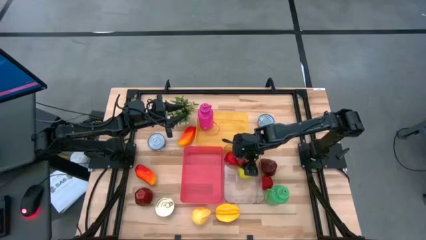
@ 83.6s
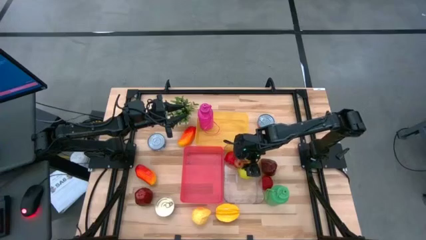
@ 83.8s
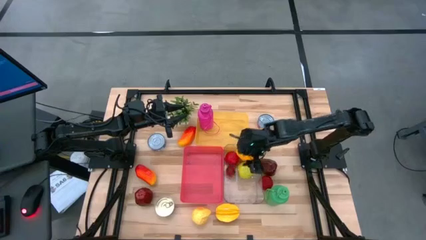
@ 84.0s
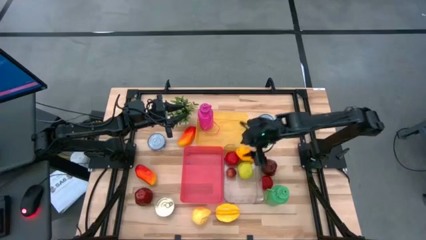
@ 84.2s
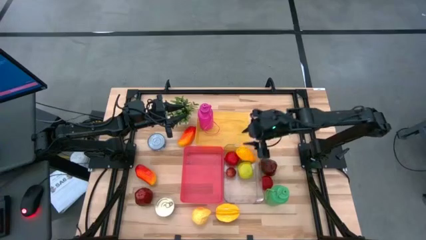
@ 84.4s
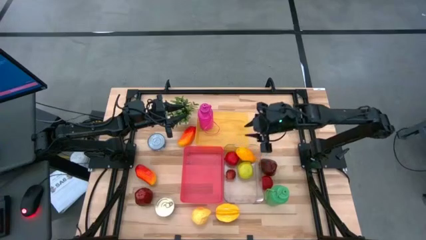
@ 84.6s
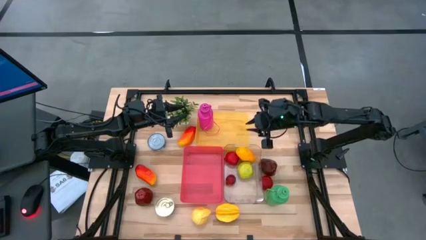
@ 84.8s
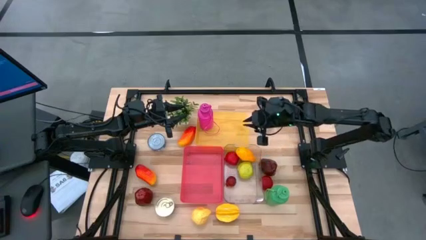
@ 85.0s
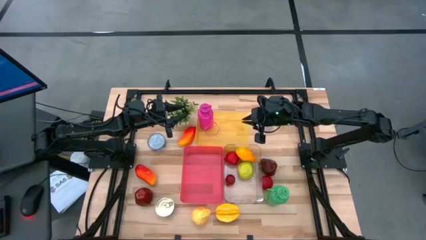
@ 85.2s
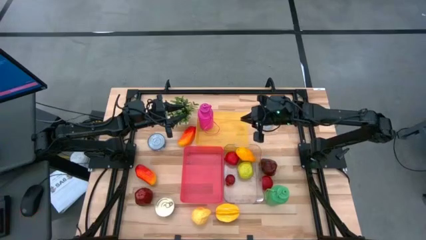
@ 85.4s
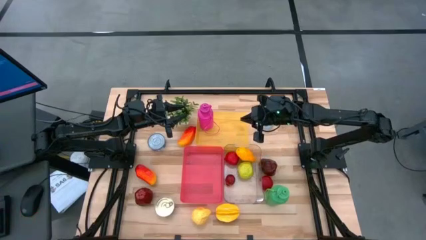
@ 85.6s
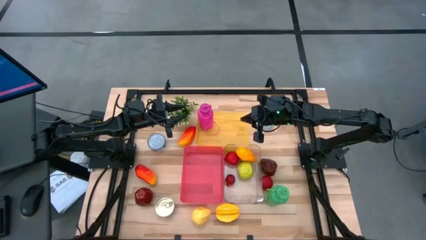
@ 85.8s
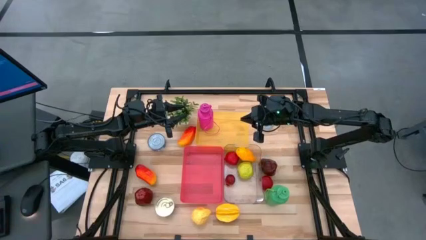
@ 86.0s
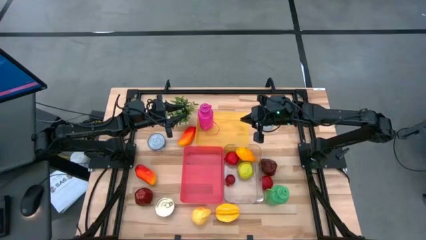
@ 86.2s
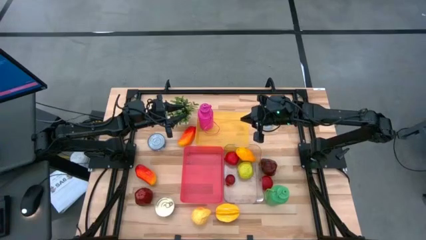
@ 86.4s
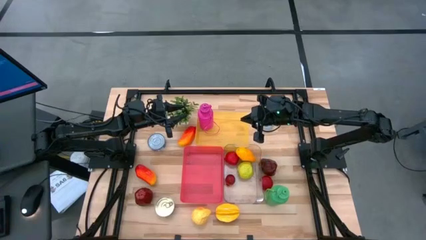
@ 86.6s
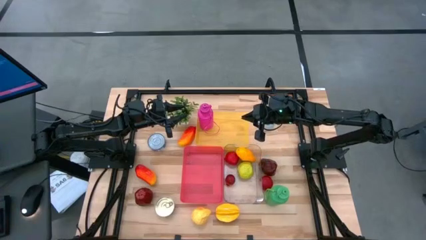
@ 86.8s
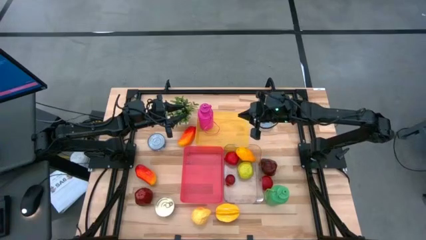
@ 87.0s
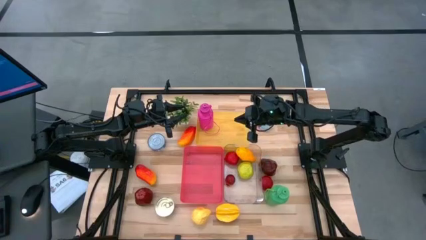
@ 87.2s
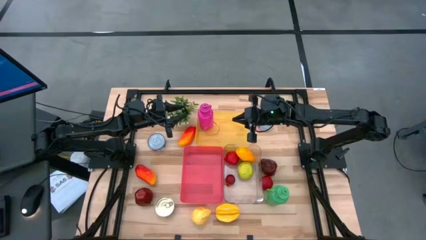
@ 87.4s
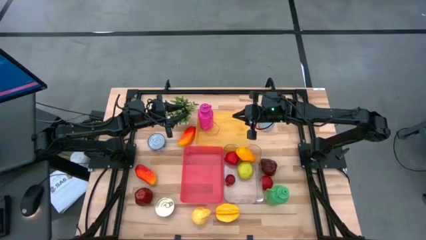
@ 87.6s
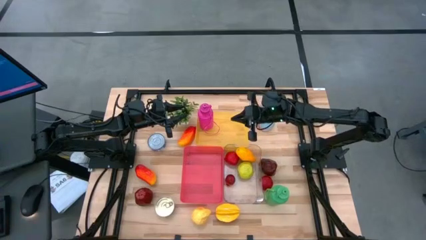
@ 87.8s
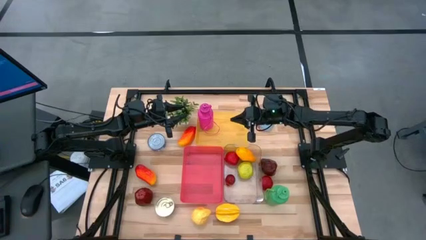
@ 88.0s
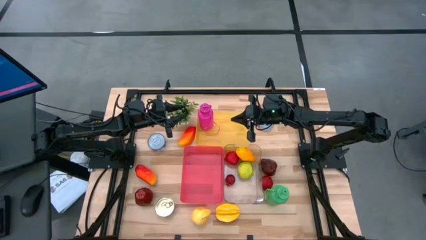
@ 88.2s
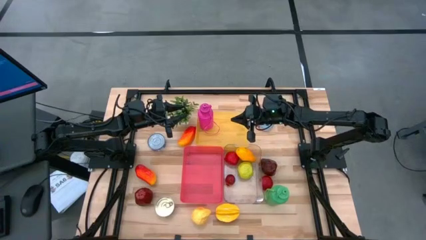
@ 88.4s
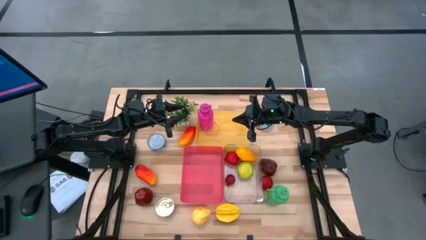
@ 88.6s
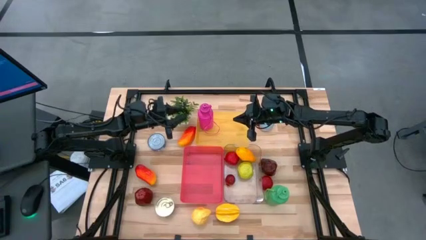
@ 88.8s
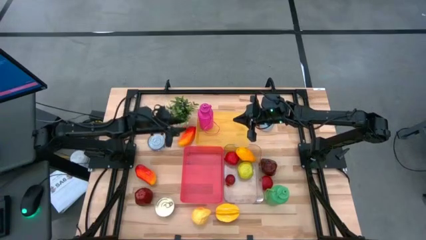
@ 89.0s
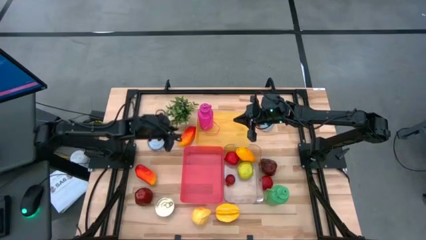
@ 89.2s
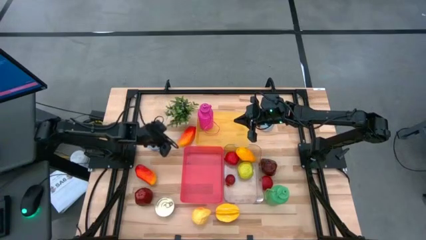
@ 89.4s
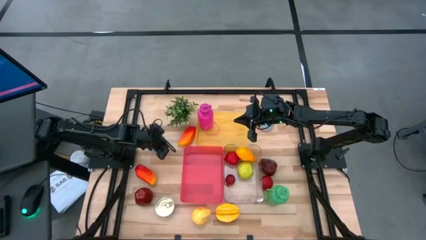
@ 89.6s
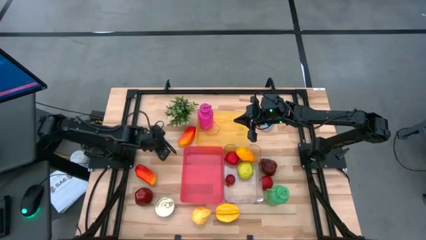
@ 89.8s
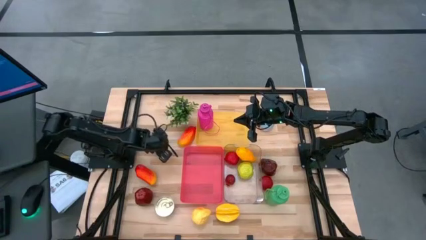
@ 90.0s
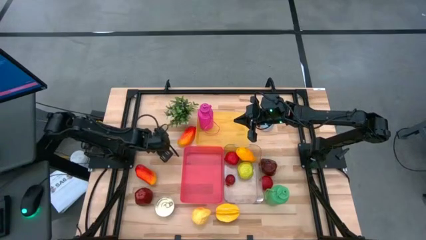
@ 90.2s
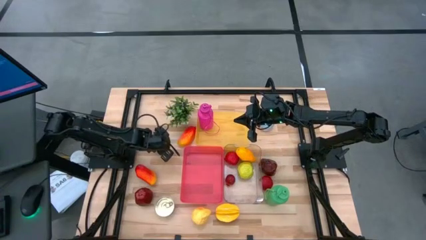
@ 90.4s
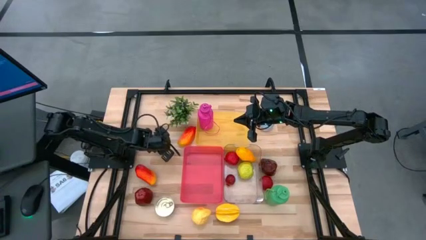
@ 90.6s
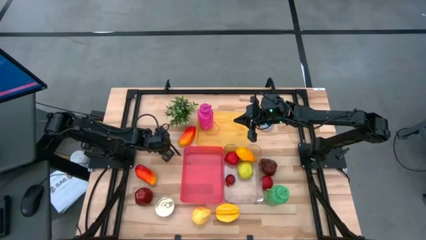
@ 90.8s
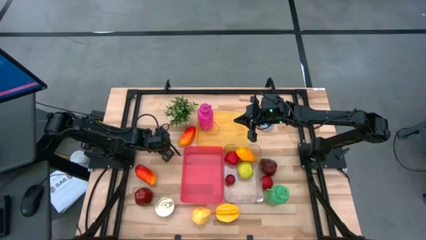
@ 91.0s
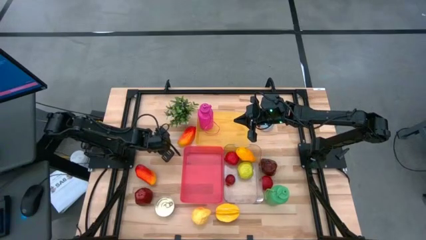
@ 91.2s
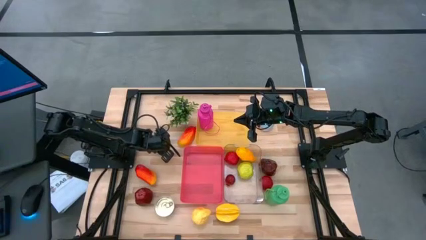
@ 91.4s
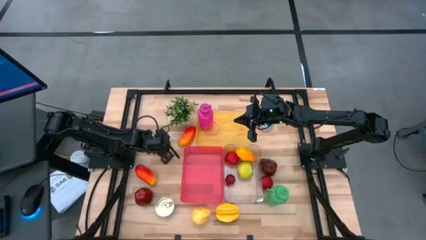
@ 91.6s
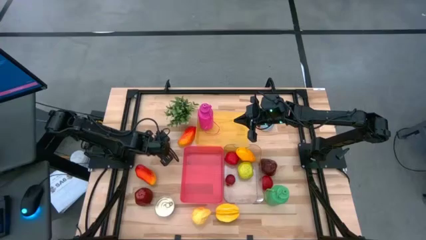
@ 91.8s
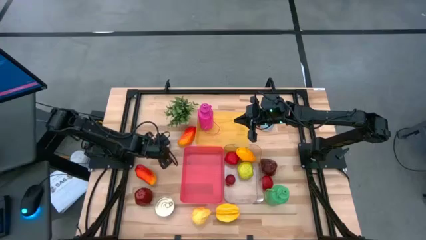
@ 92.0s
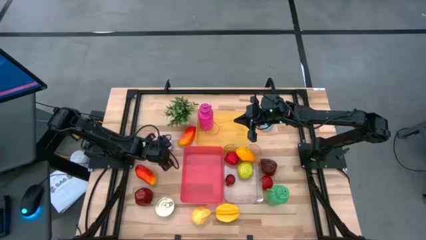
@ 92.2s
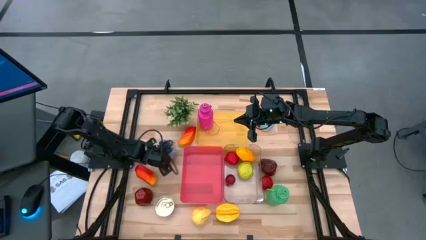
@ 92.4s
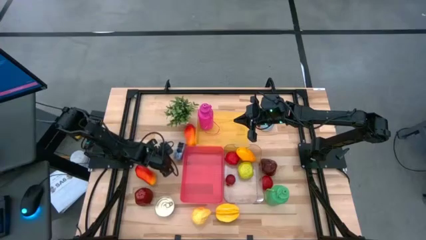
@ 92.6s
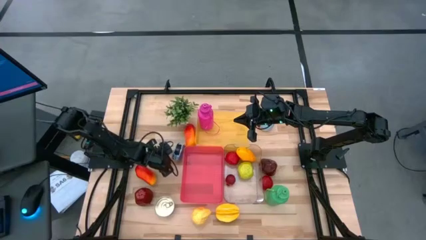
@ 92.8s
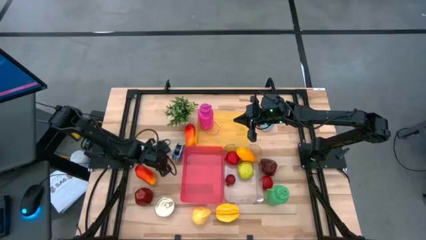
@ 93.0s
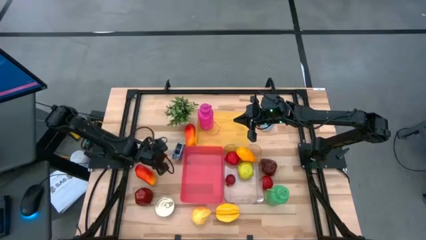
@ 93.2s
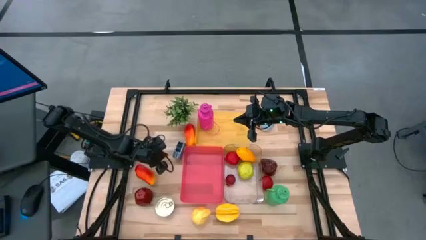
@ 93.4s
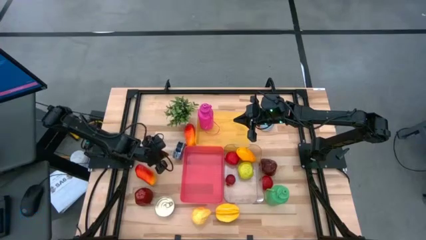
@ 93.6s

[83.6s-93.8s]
Task: Pick & Place Food Item
Put the blue tuna can into the red bin

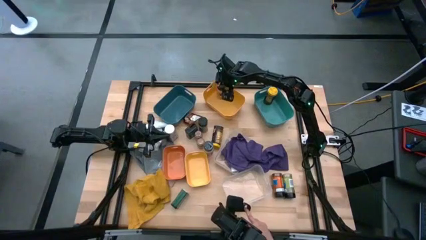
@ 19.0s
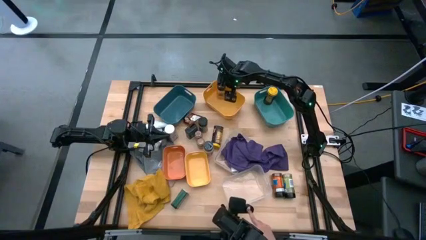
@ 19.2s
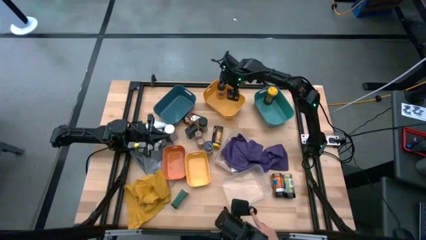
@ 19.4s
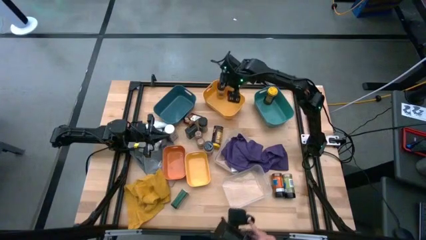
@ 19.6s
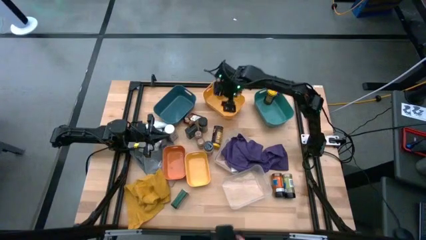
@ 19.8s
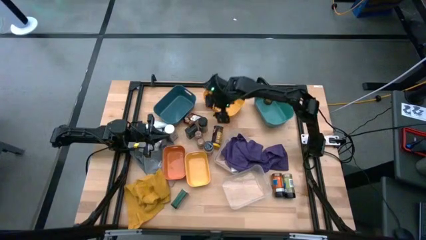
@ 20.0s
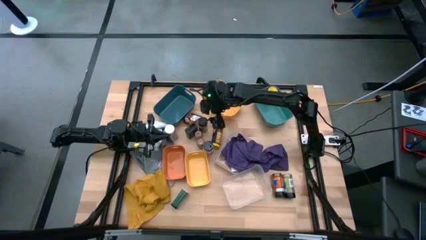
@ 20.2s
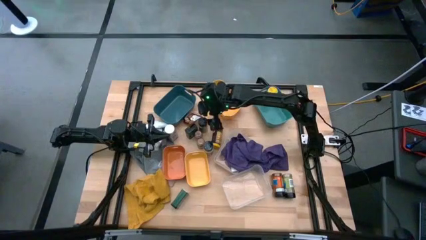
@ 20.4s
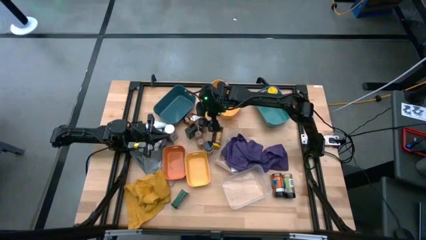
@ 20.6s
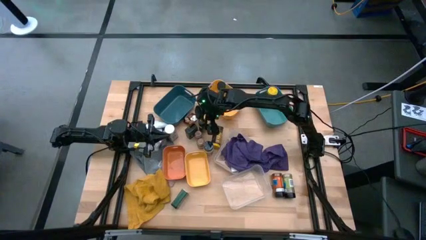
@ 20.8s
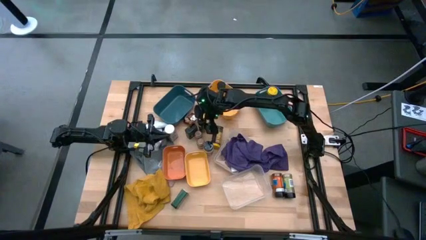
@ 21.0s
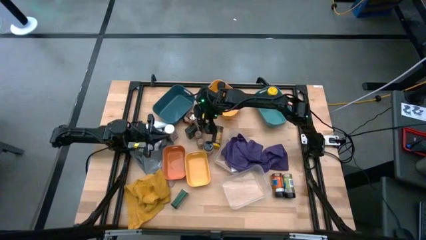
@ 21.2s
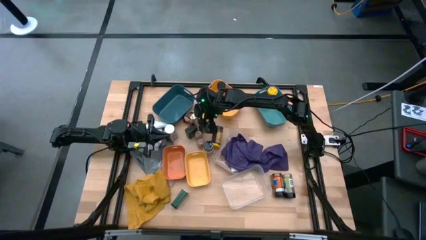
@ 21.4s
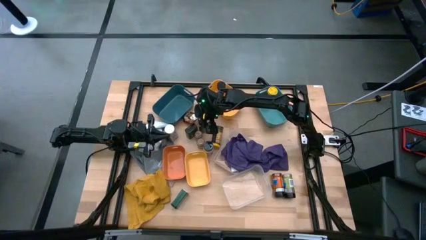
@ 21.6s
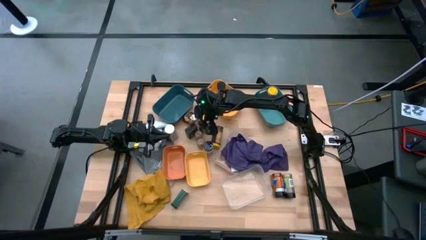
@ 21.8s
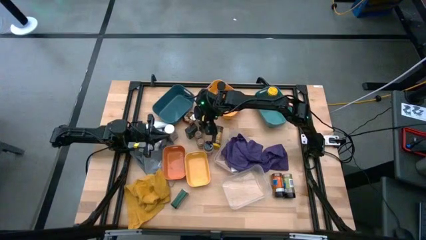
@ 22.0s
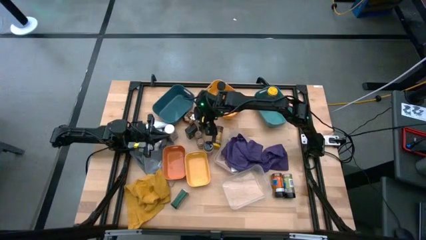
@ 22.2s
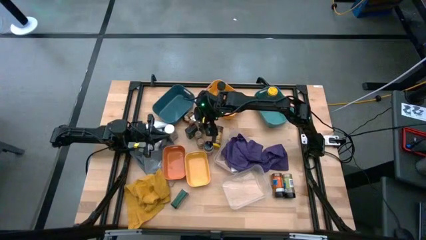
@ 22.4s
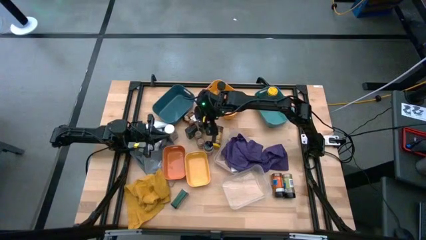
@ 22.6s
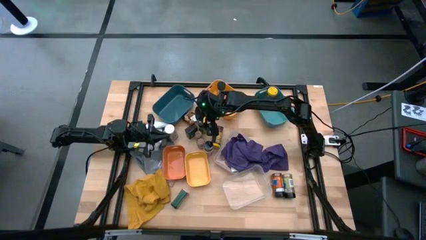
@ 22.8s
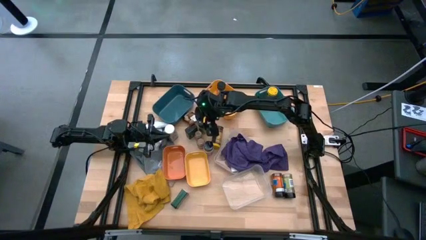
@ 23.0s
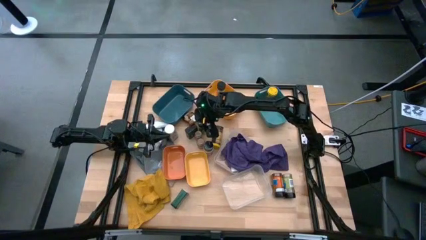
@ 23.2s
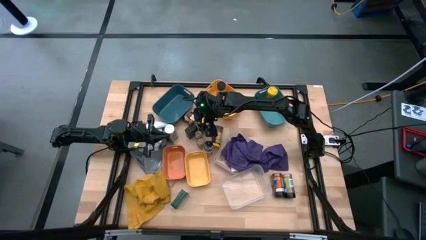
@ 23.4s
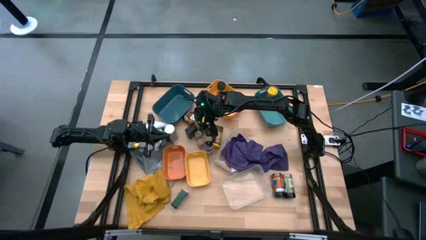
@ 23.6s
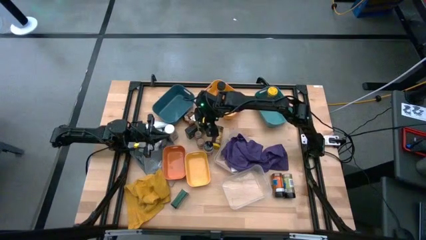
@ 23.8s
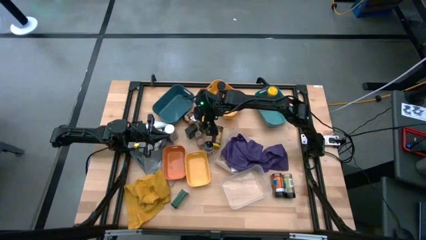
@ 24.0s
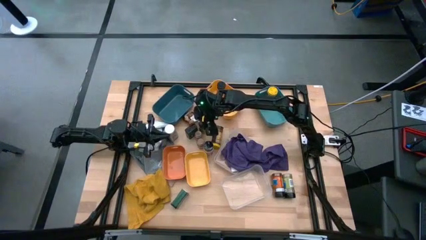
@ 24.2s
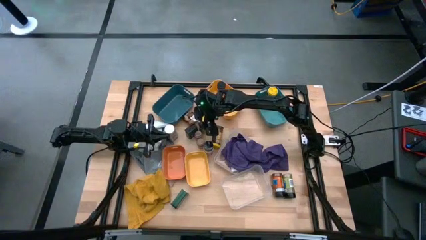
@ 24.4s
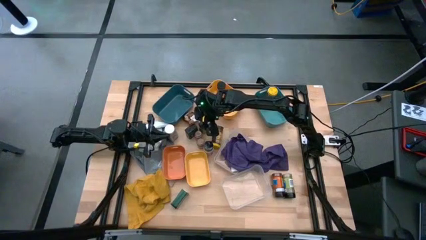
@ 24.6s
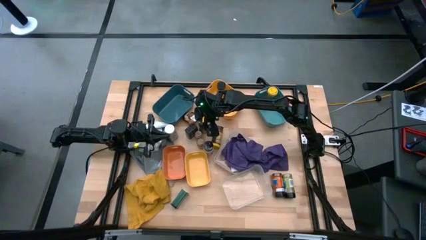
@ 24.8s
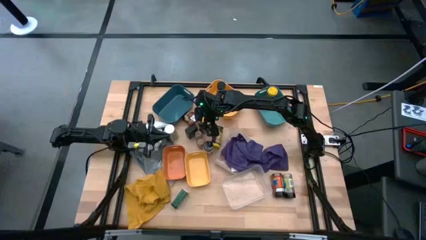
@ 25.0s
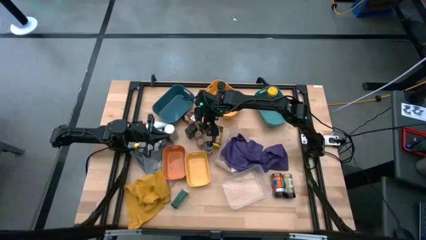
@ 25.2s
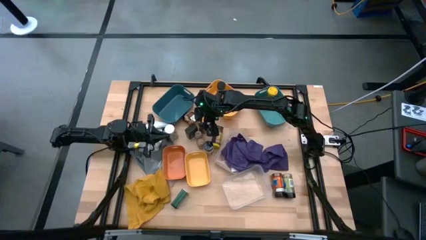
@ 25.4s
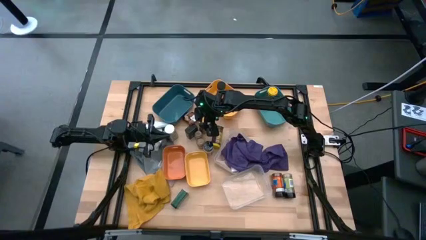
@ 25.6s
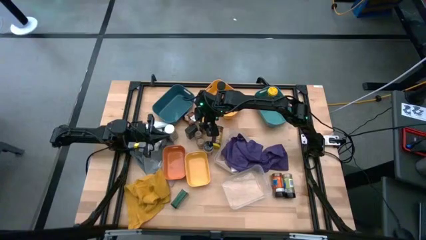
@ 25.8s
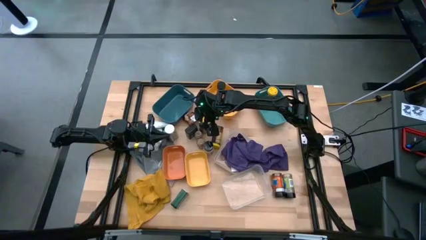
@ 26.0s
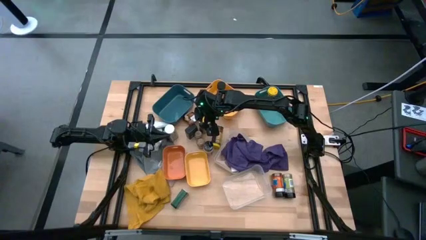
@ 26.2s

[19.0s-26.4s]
Task: Sort spices by type
Put the green spice bottle into the yellow bin
